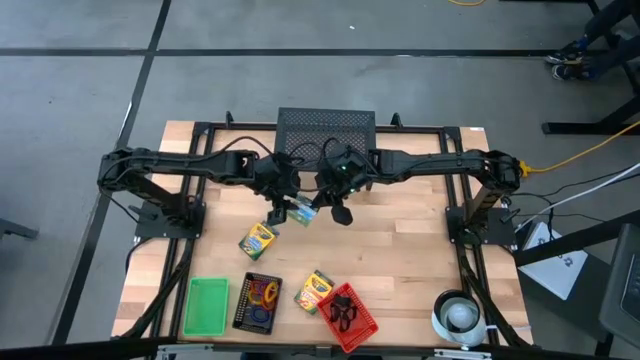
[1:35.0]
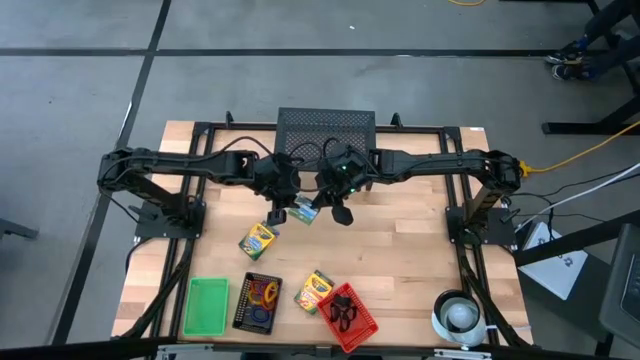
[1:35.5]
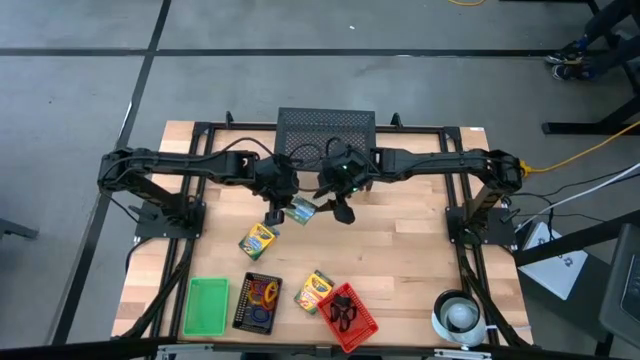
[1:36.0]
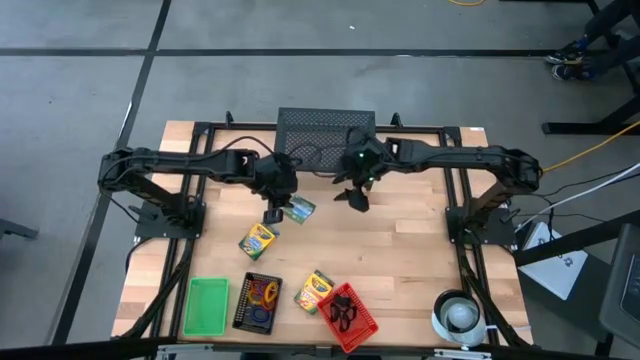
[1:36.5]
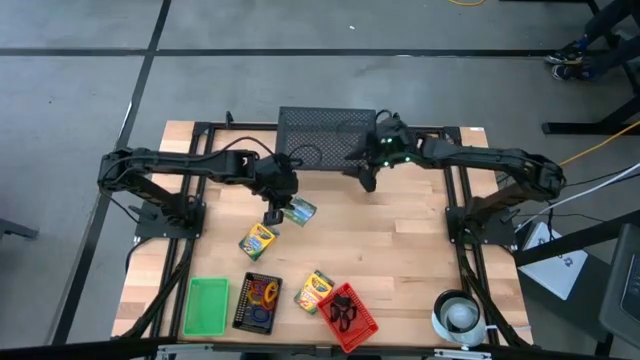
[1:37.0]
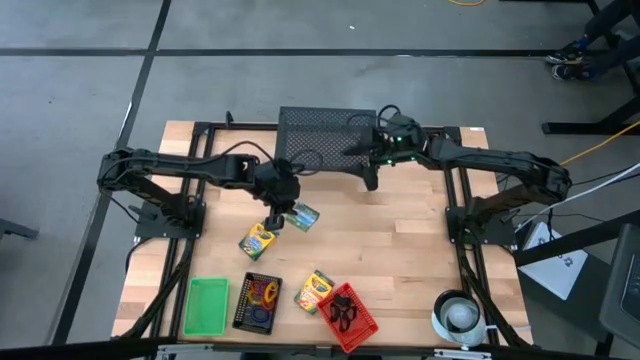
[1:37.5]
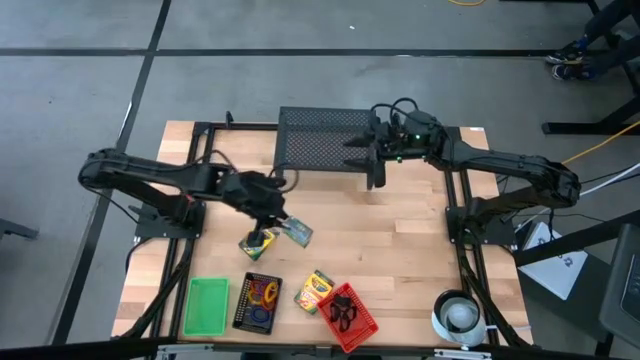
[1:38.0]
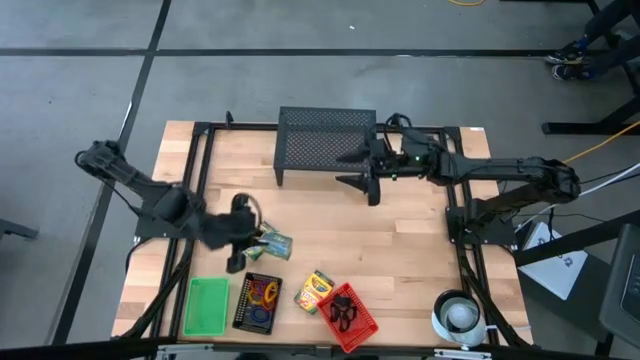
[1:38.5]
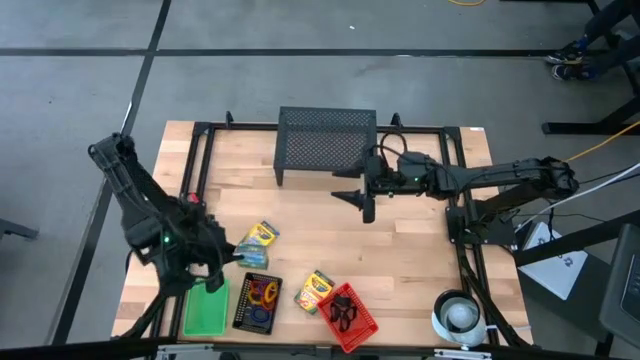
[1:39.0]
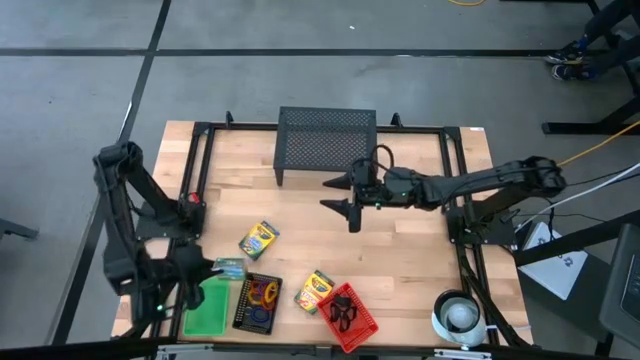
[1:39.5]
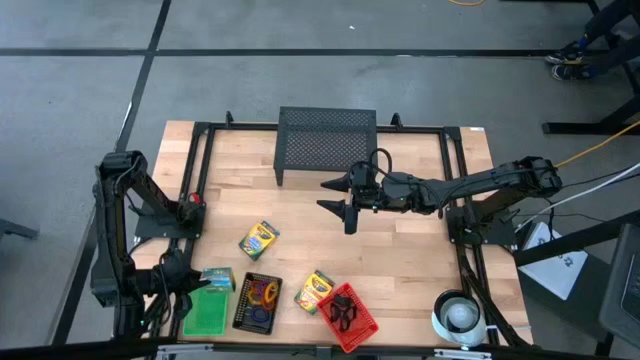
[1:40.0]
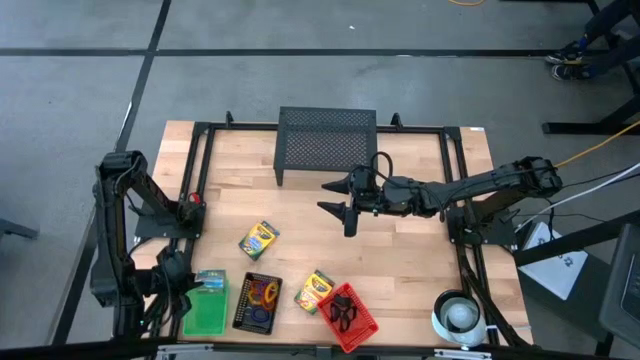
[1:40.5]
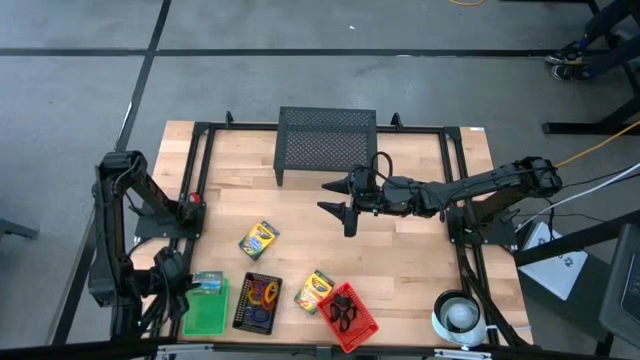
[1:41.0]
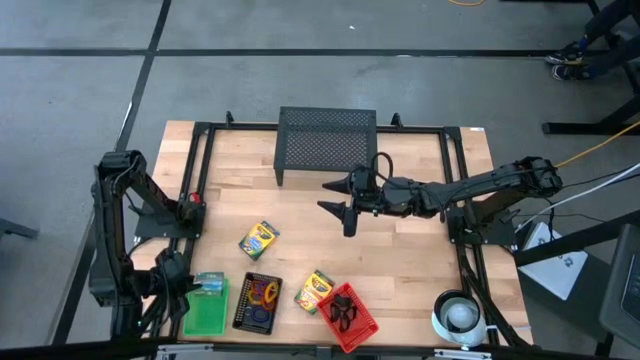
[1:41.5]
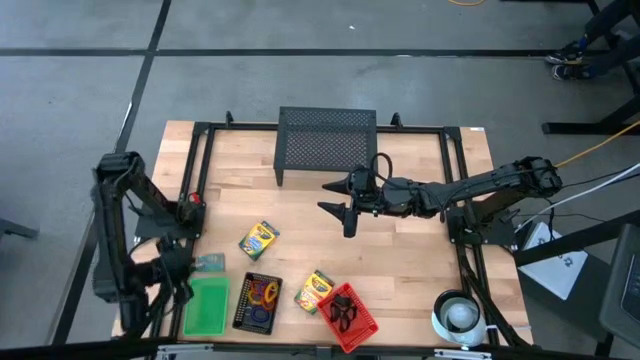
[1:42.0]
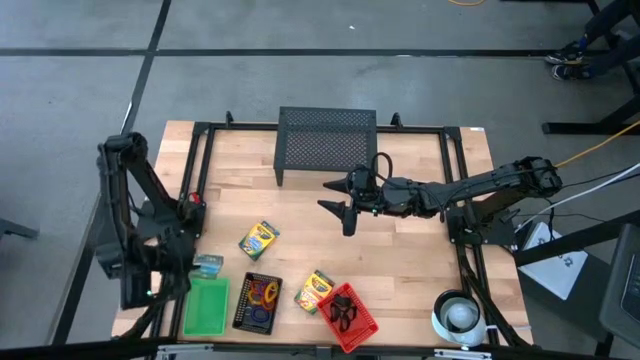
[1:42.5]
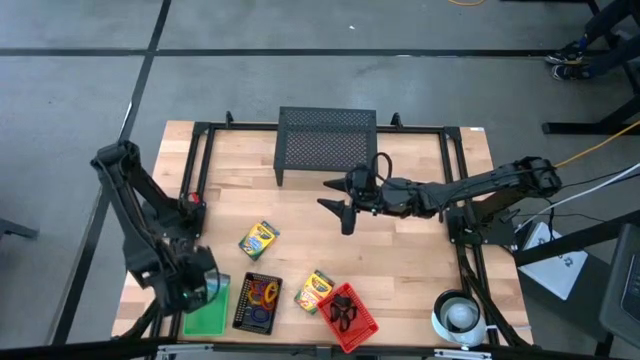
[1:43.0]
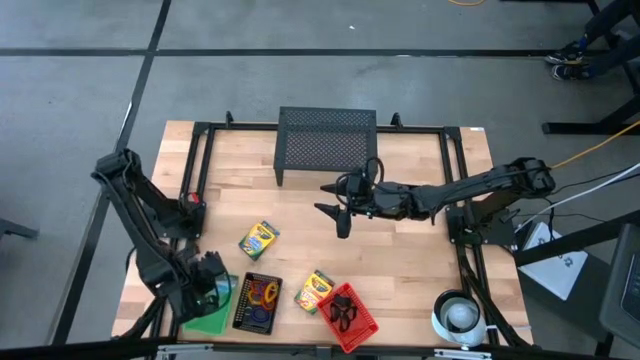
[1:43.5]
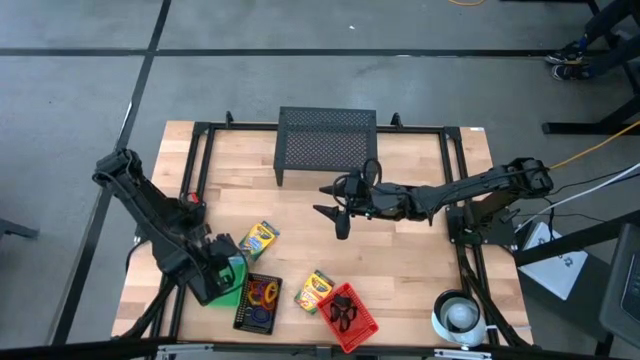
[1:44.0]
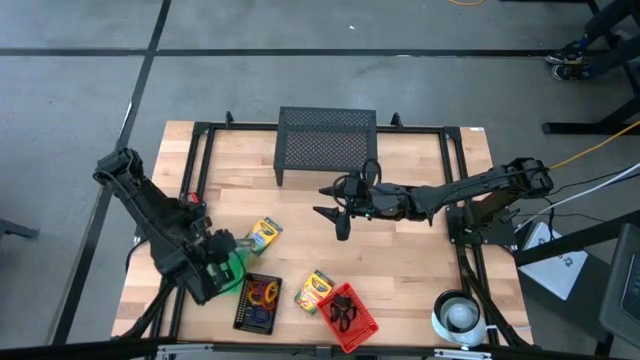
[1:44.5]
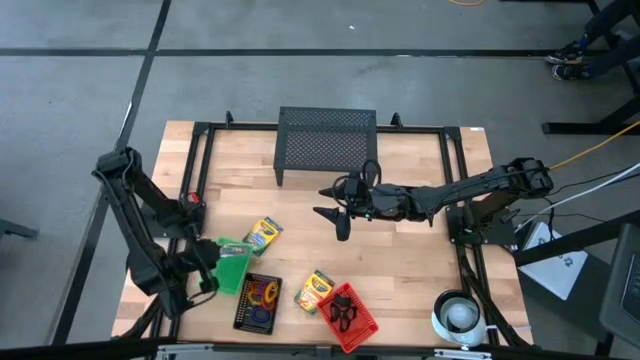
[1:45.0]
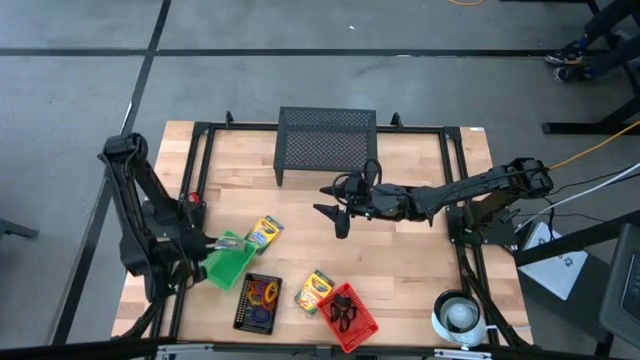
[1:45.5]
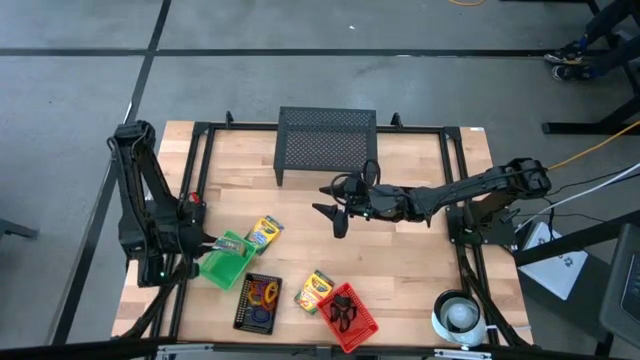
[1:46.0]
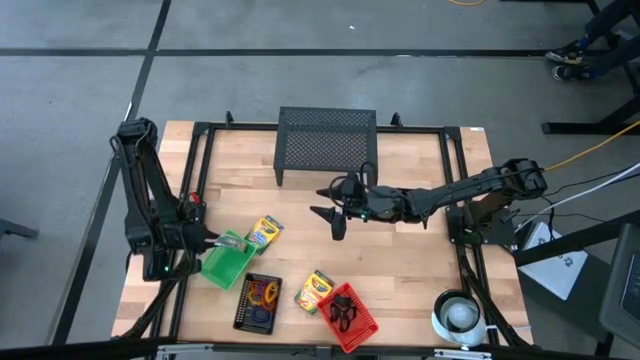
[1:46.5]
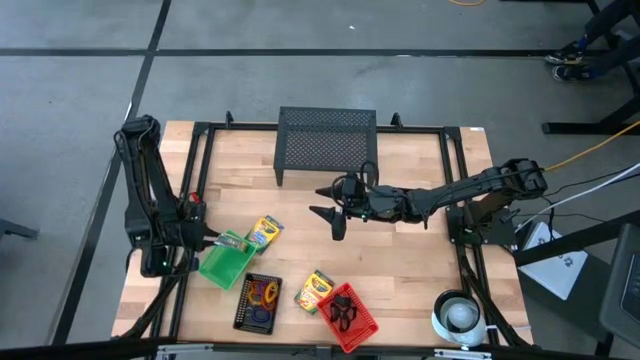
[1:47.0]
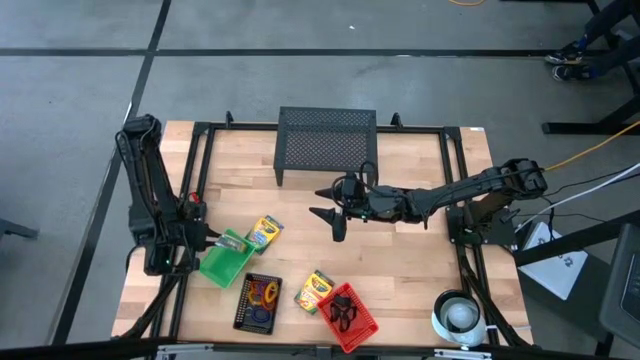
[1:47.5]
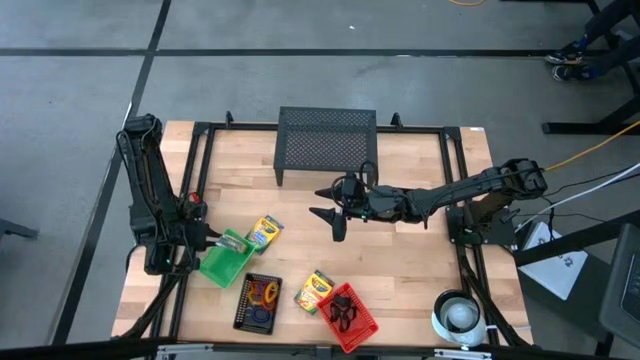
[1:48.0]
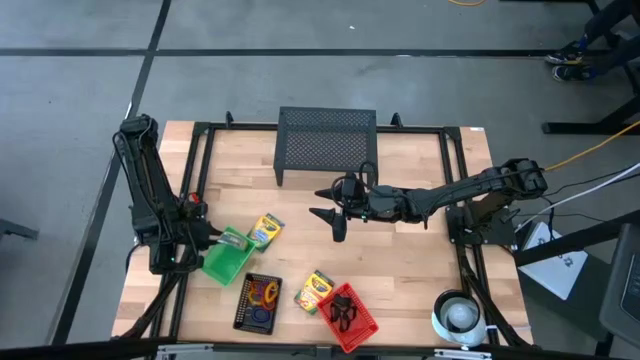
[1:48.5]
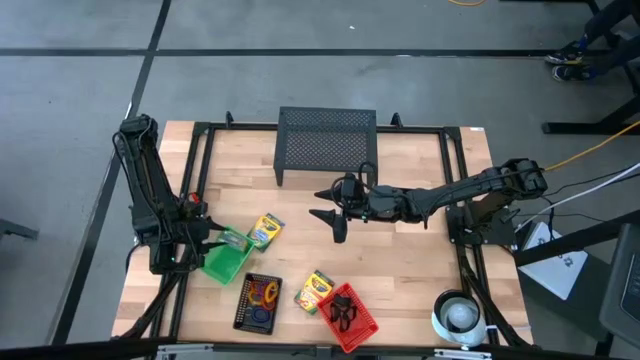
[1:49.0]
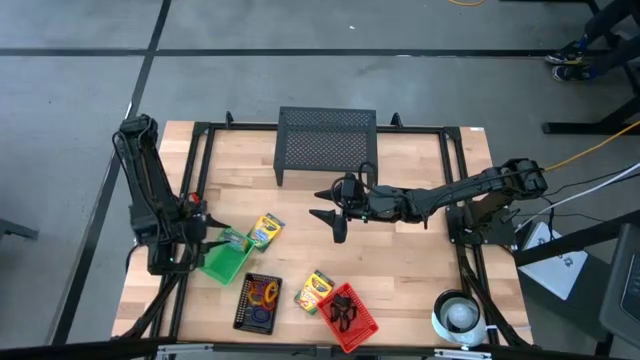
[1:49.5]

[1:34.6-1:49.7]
Task: Pick & Place Office Desk Supplies
Put the green crayon box into the green bin

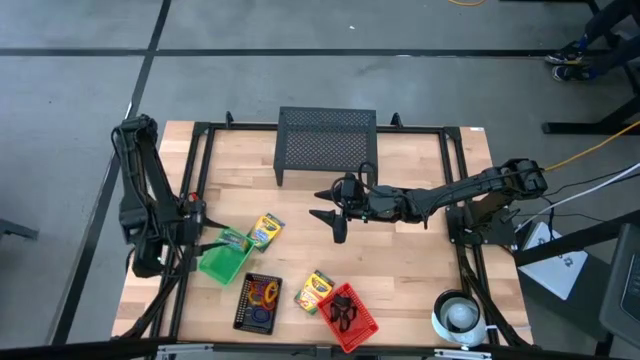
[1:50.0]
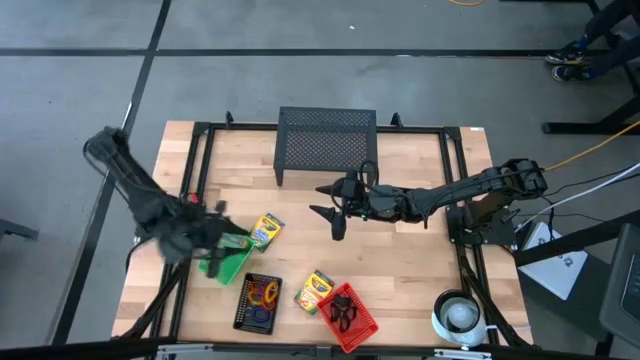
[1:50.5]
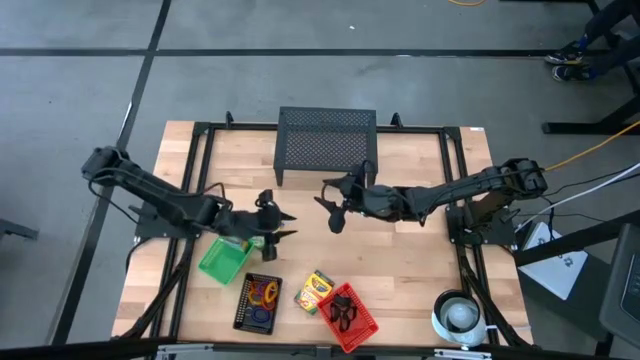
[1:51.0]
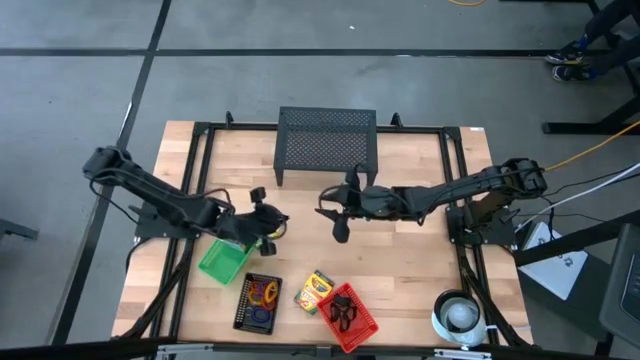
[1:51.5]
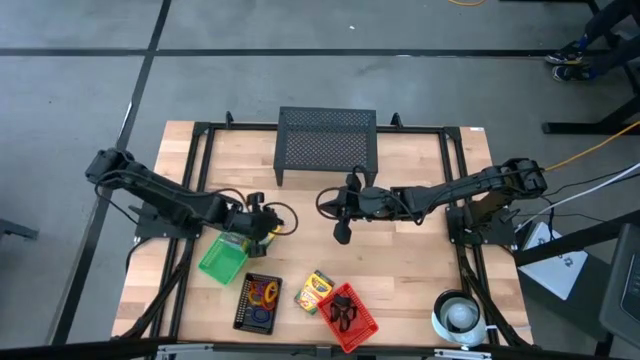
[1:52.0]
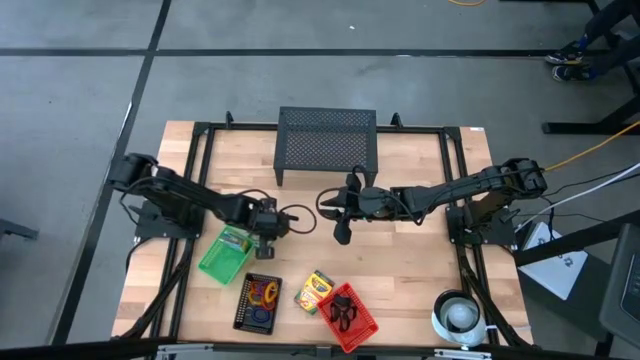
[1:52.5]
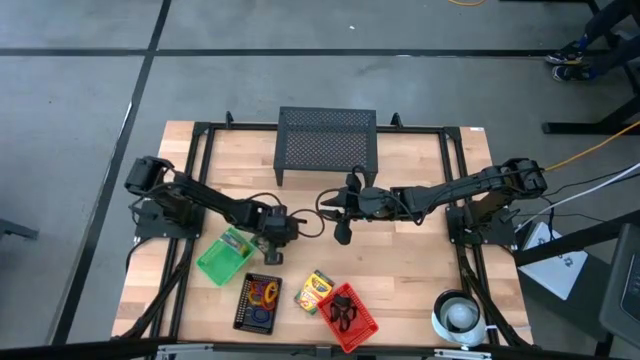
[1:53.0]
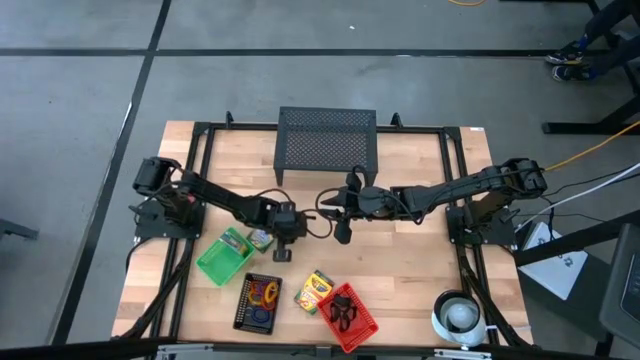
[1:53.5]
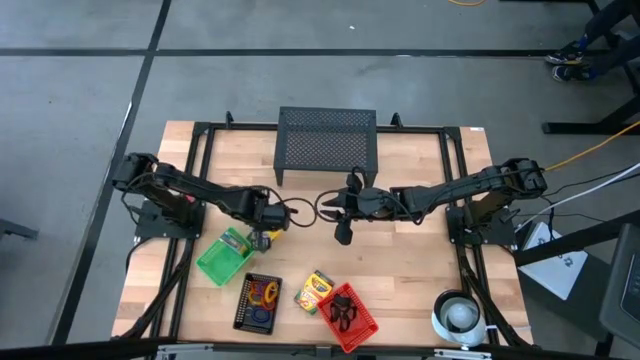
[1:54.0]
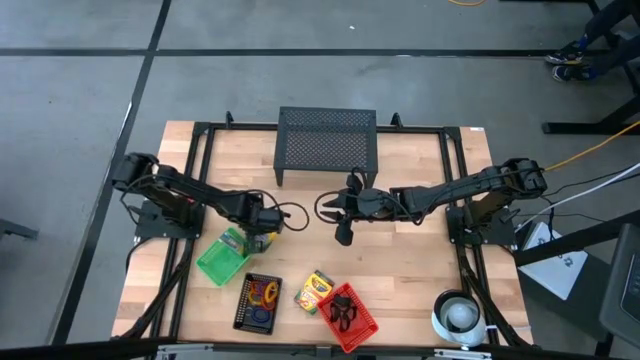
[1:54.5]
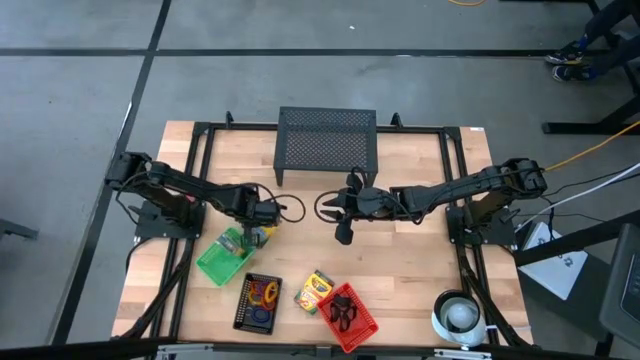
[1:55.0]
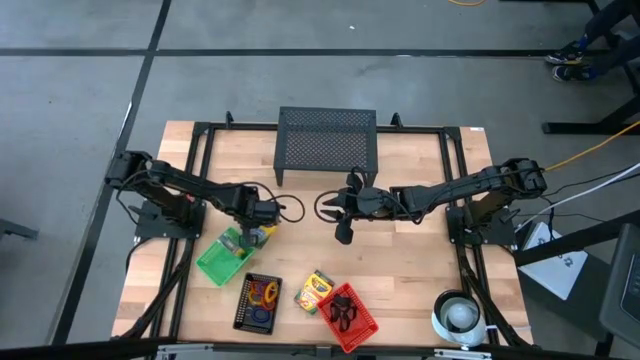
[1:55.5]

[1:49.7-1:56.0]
Put the yellow crayon box into the green bin

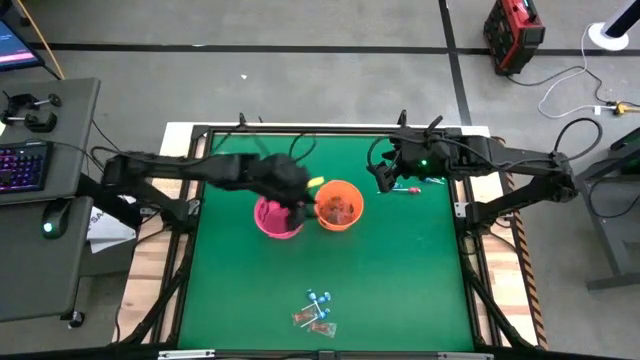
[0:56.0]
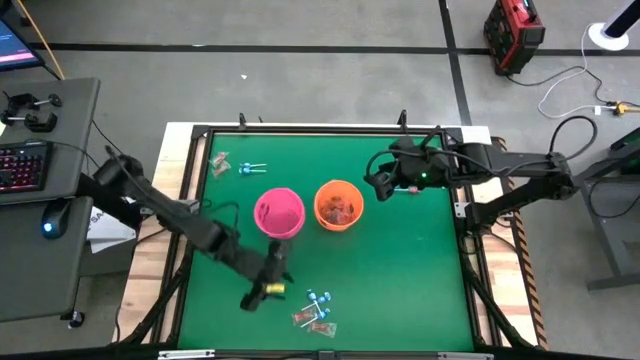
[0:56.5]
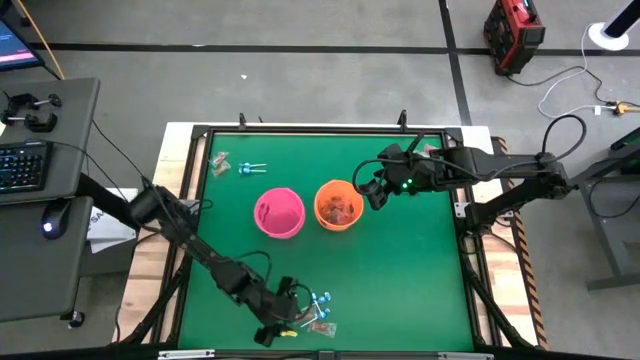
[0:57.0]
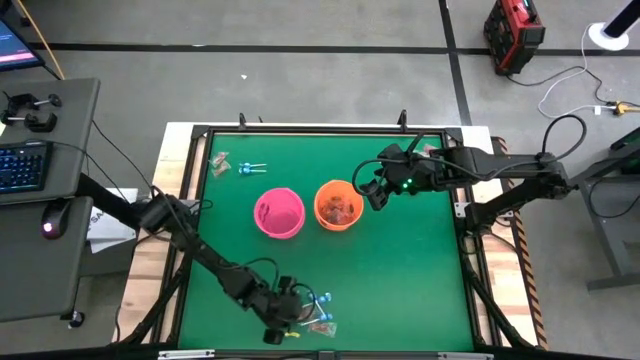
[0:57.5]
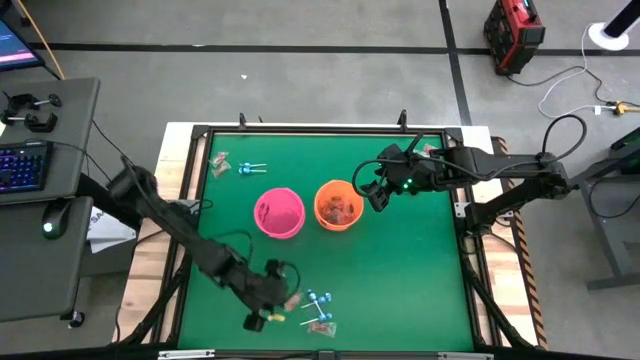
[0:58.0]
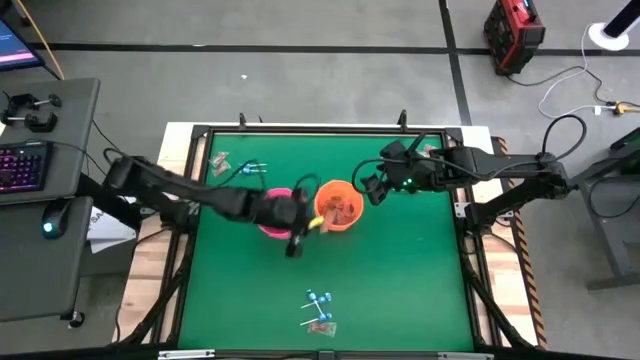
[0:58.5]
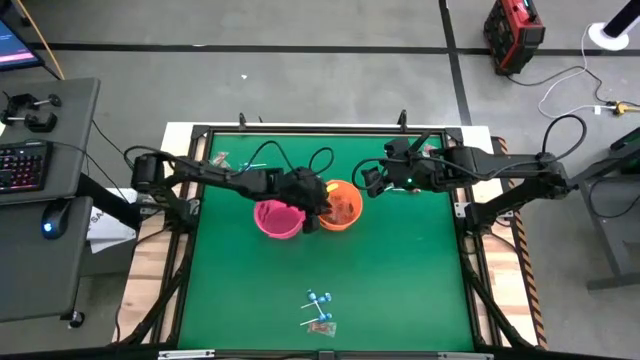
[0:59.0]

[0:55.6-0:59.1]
Task: Sort candy by brand, put in halloween buckets
Put the orange gummy into the orange bucket
